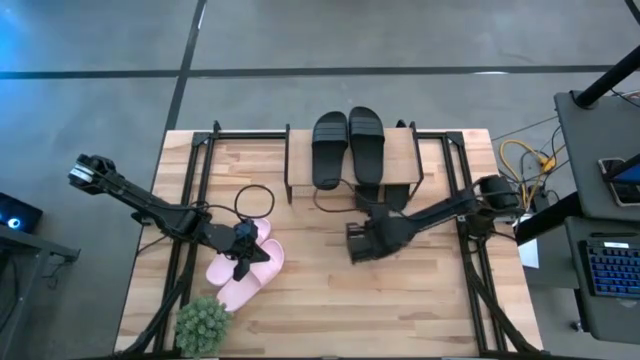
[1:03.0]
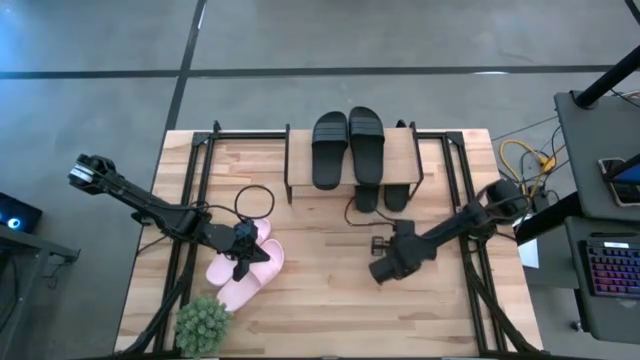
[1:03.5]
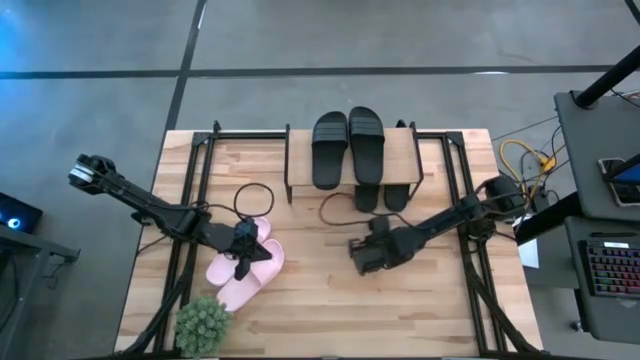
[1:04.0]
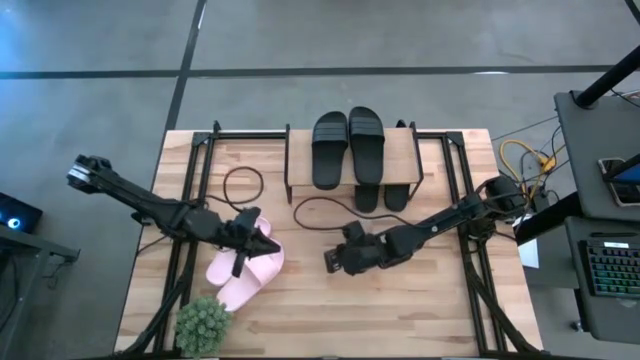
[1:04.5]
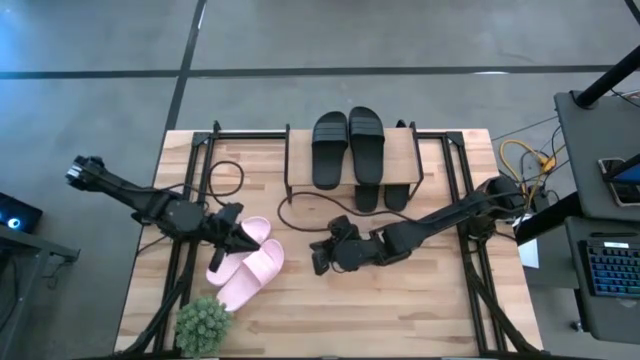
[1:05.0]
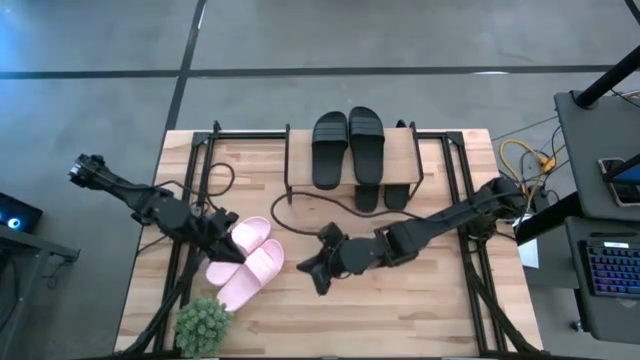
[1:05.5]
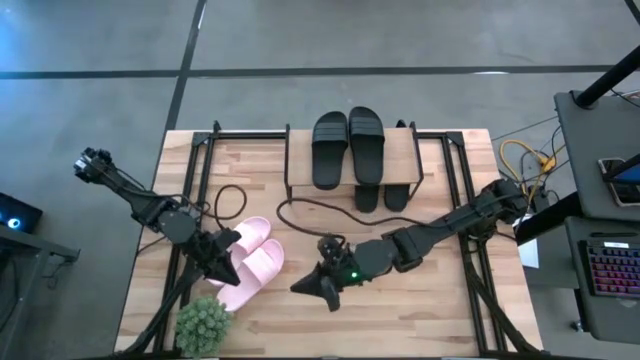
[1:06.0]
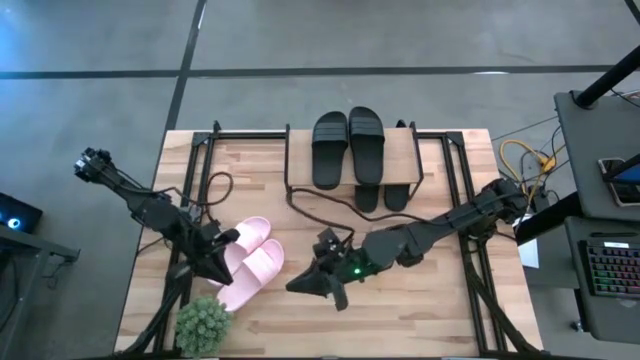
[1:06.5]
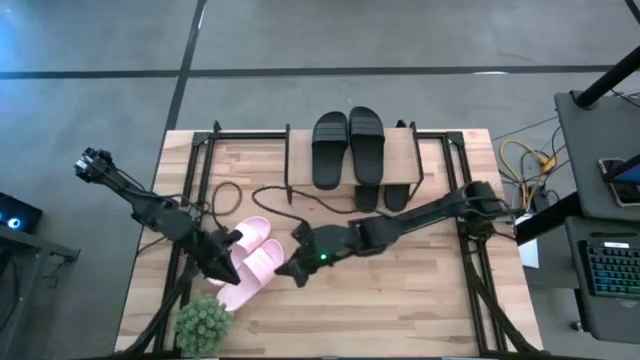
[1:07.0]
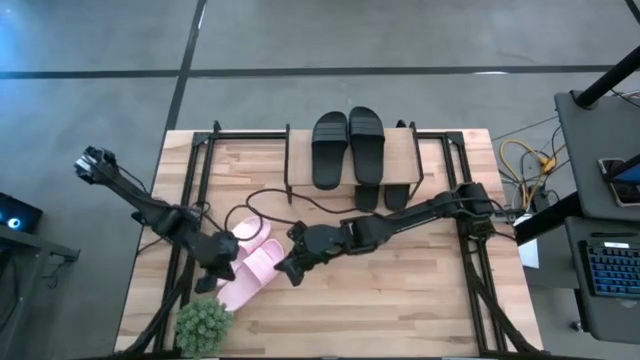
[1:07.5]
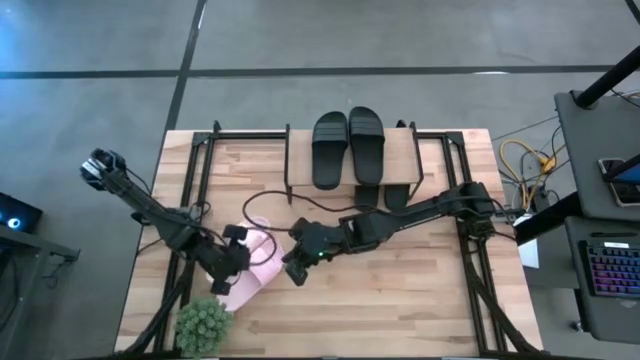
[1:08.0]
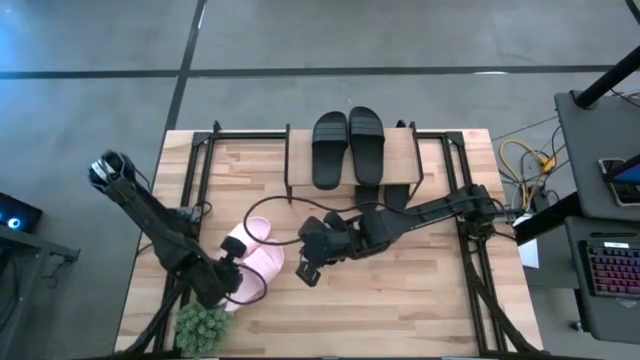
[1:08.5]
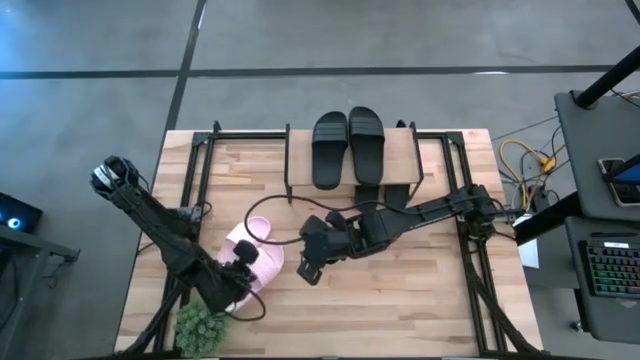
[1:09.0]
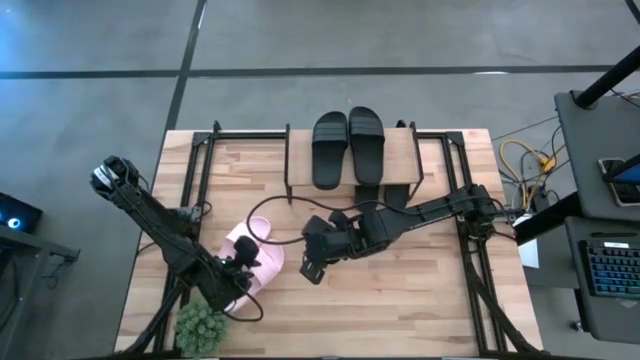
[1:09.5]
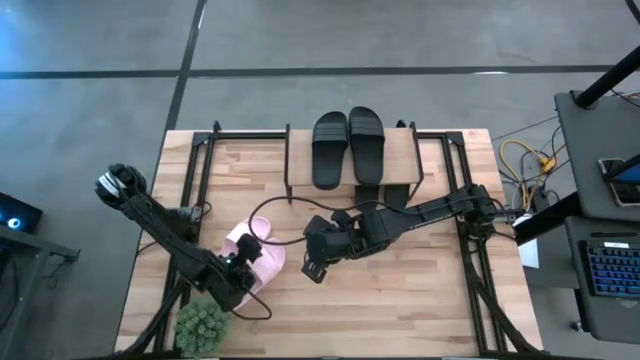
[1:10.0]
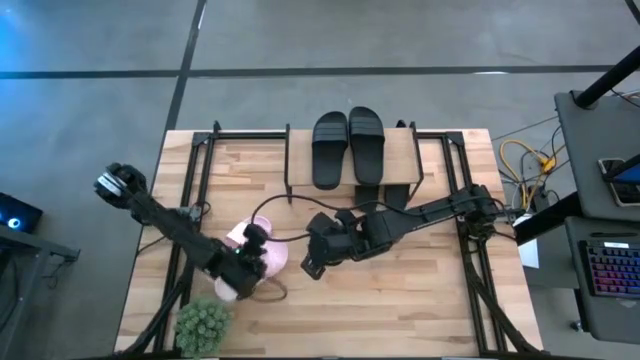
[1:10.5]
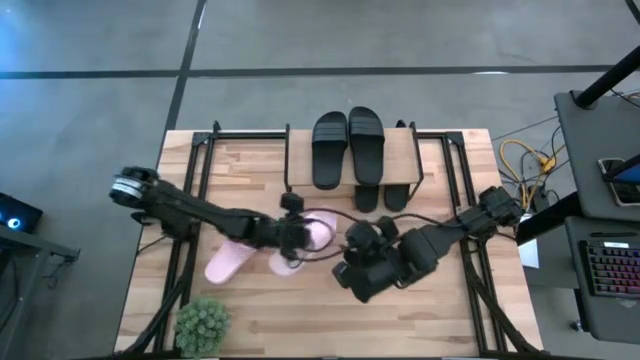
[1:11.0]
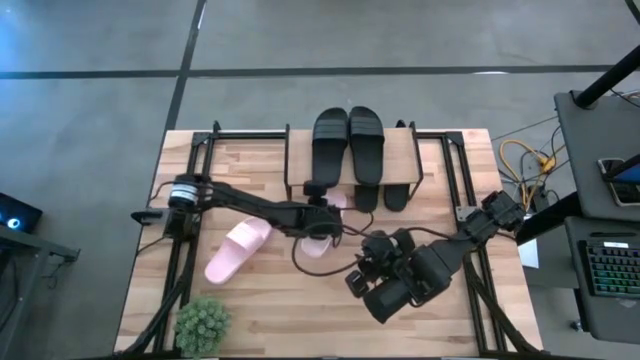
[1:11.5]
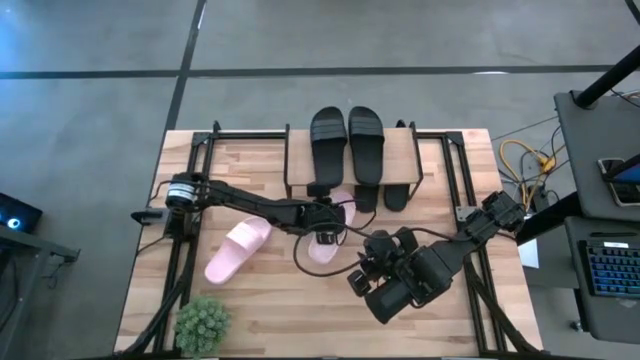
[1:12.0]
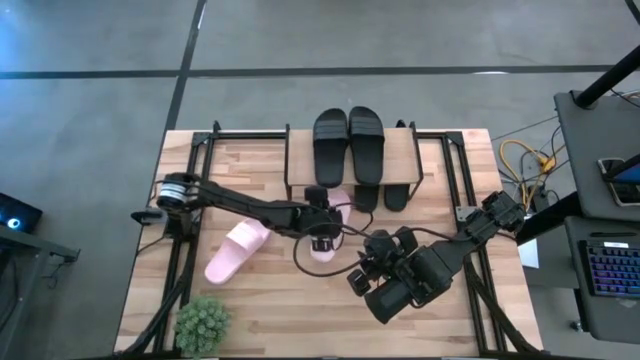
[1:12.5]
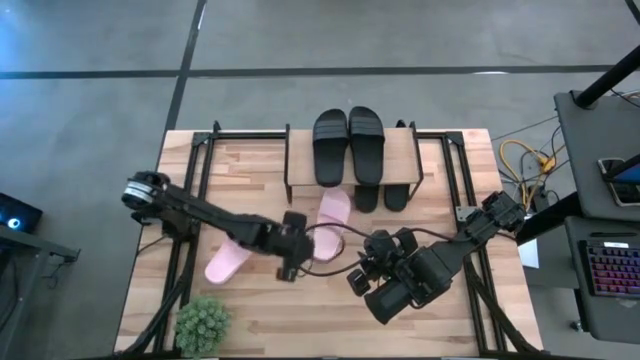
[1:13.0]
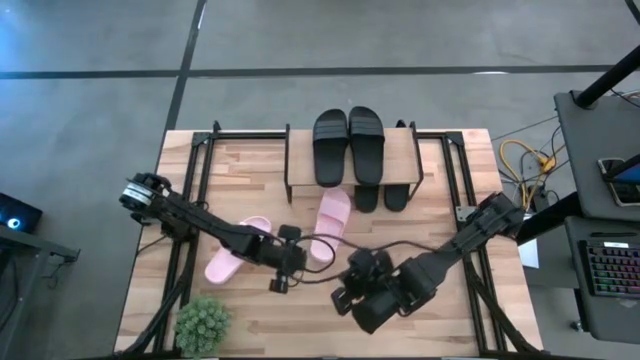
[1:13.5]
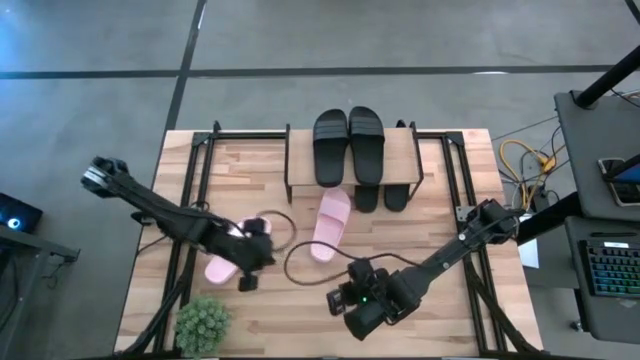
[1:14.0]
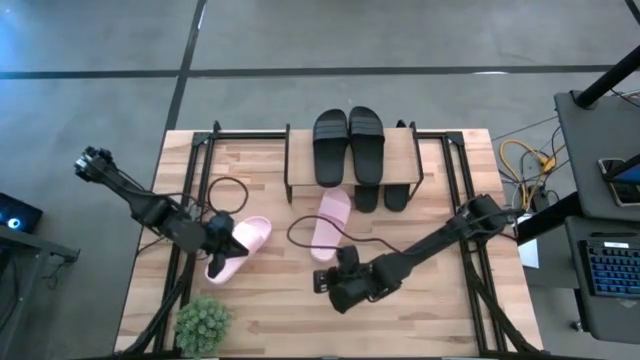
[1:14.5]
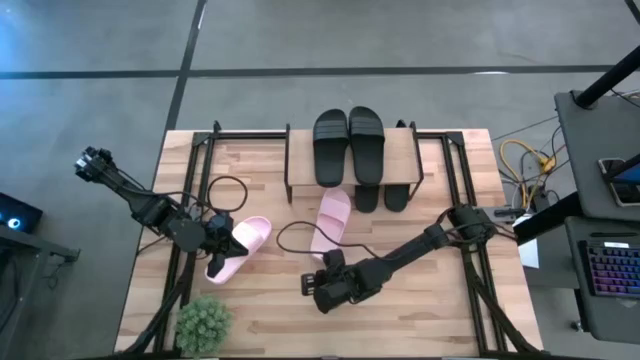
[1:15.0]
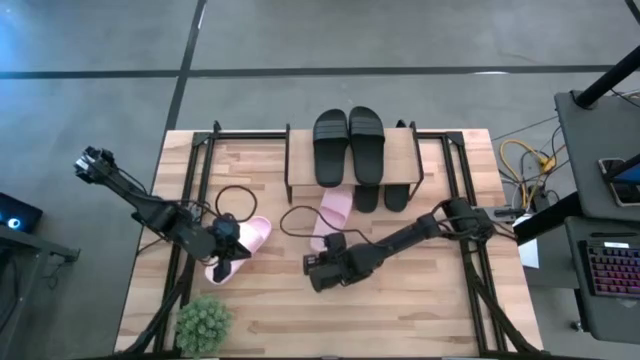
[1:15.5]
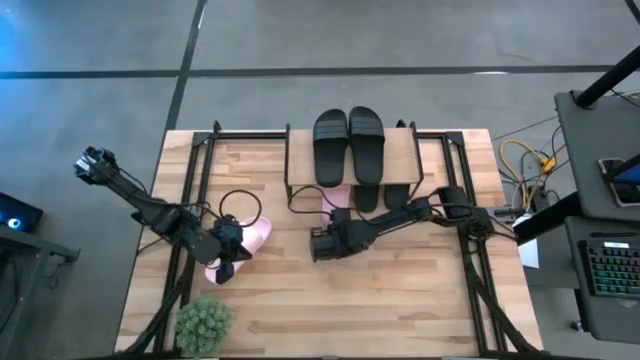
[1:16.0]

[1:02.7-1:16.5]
Task: Pick and place slides into the shelf
Put the right pink slide under the shelf

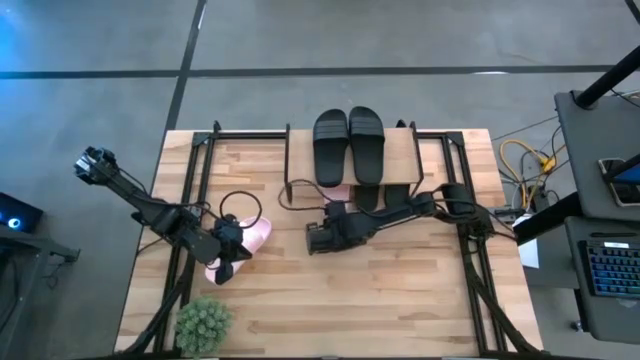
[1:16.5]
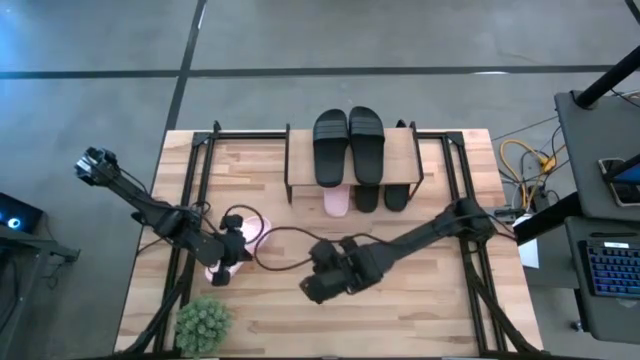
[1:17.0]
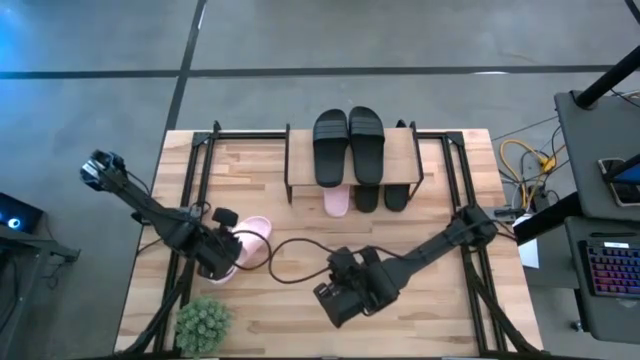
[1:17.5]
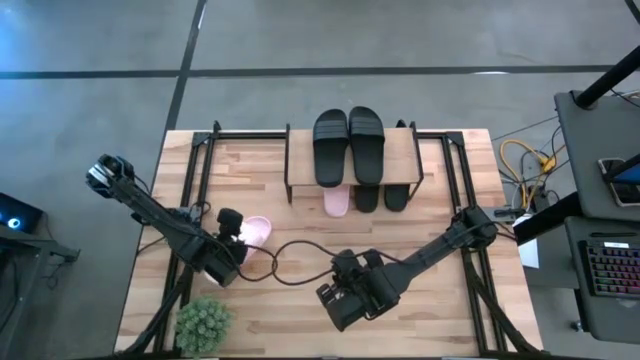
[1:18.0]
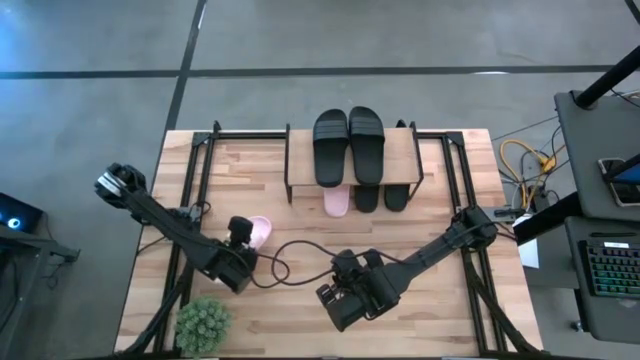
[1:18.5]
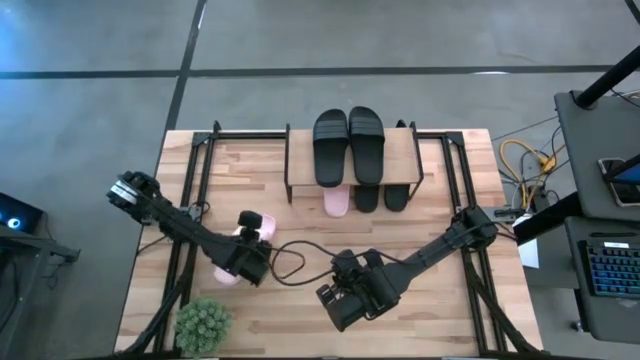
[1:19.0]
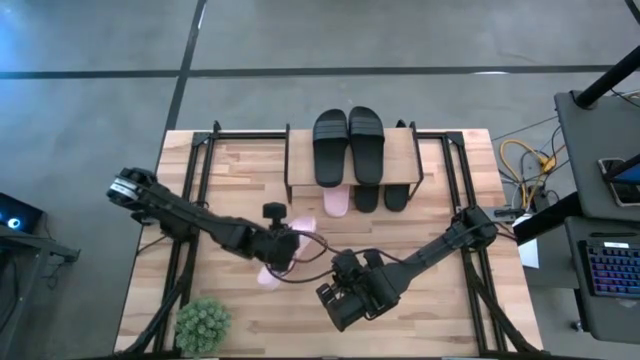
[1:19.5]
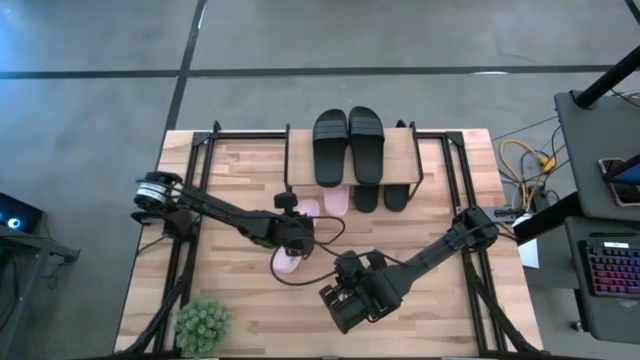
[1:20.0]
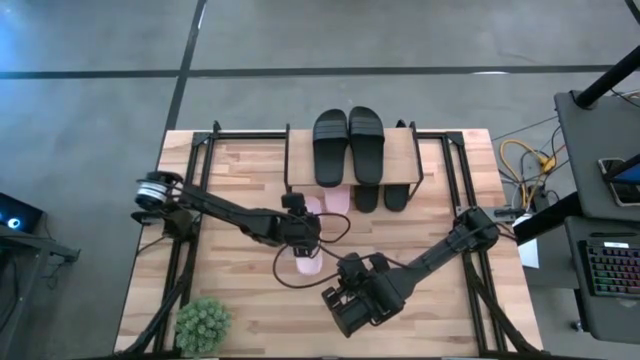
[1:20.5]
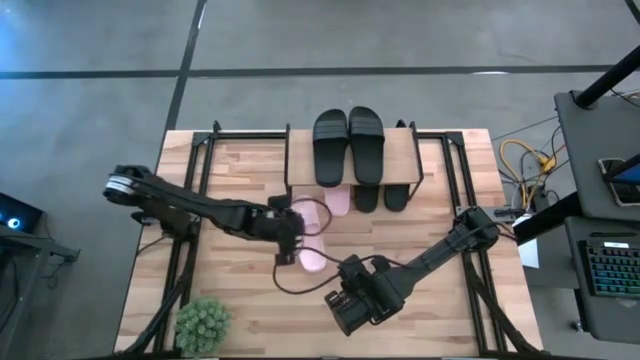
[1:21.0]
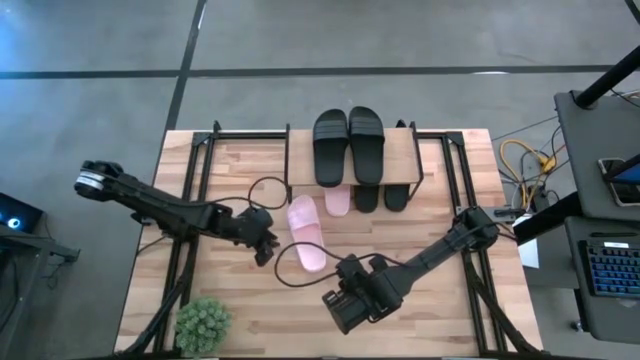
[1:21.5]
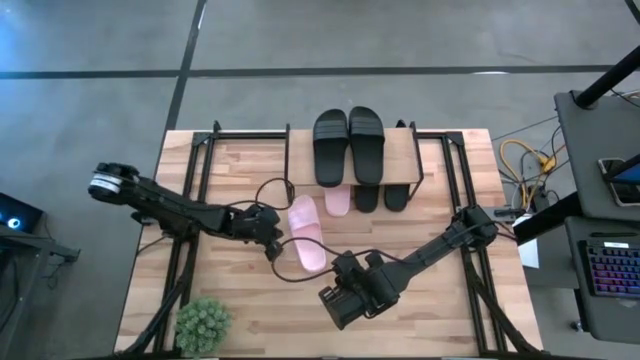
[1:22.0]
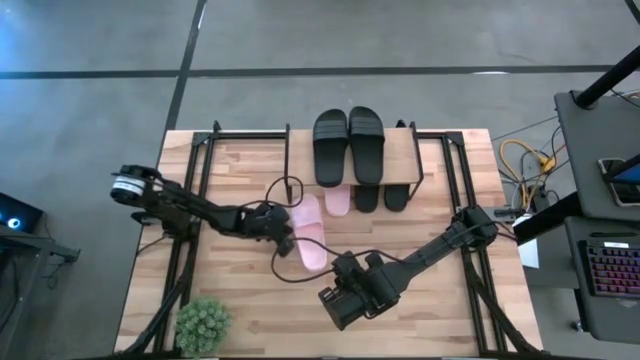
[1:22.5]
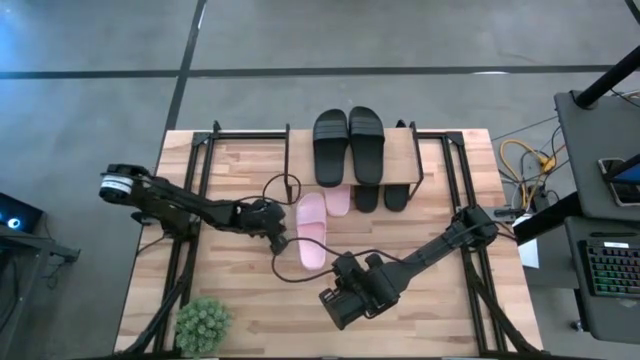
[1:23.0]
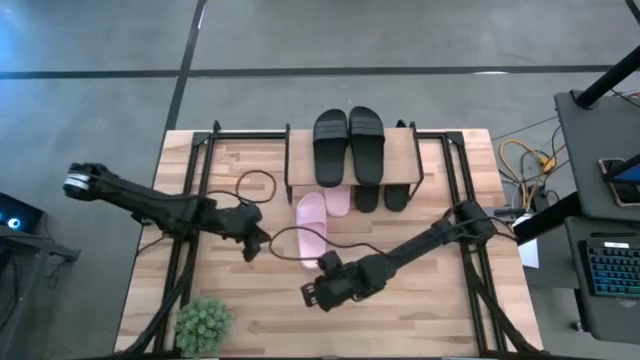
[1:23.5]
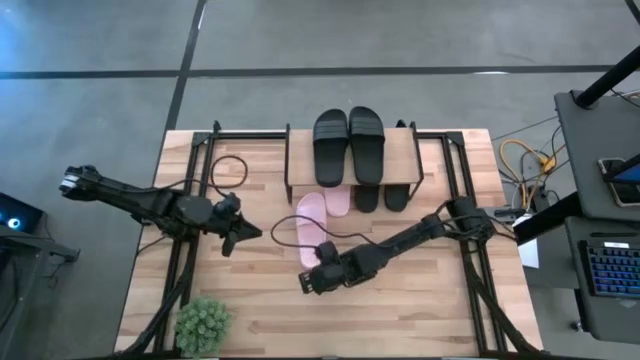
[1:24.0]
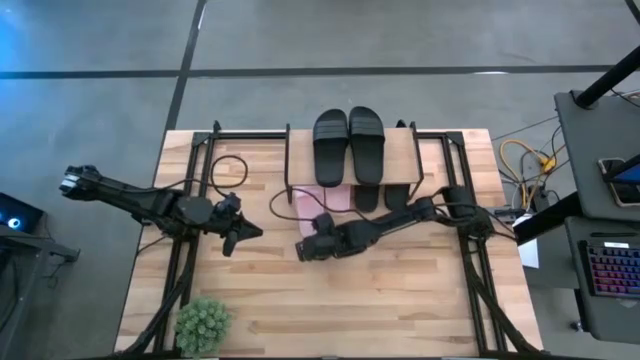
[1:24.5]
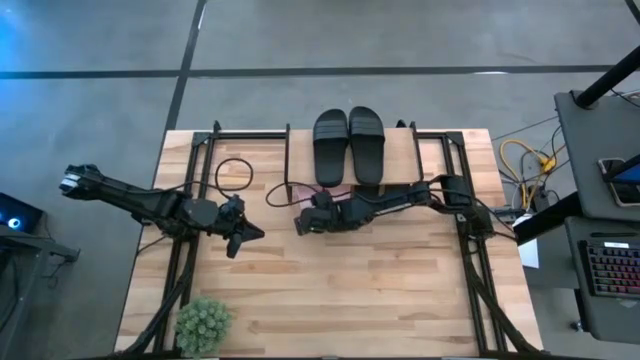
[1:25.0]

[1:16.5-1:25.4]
Put the pink slide under the shelf

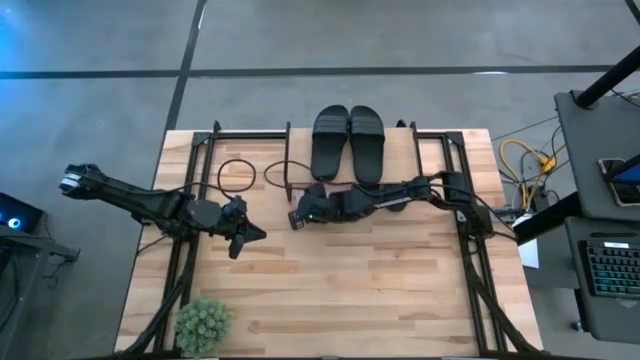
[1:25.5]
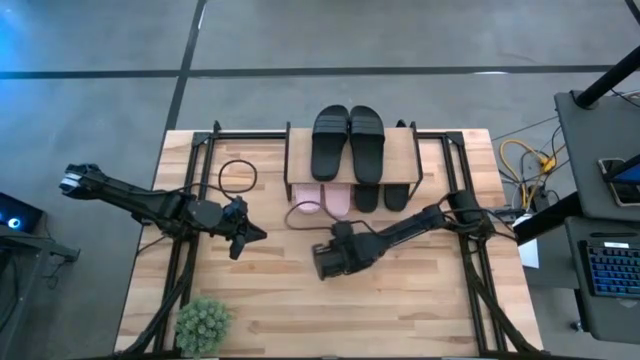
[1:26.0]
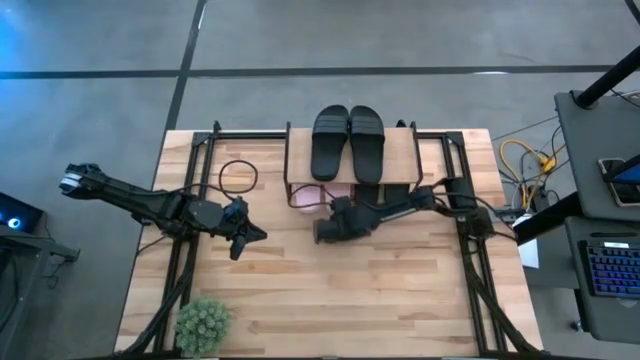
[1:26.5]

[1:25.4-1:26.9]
Adjust the right pink slide under the shelf
